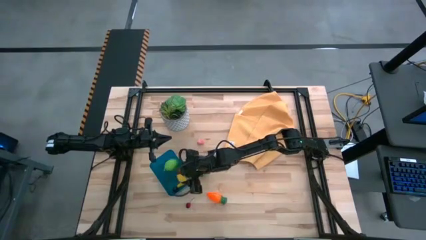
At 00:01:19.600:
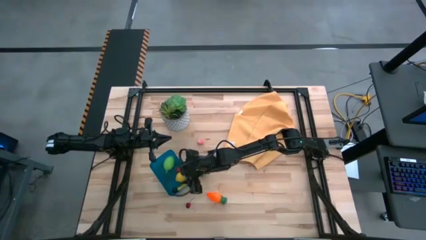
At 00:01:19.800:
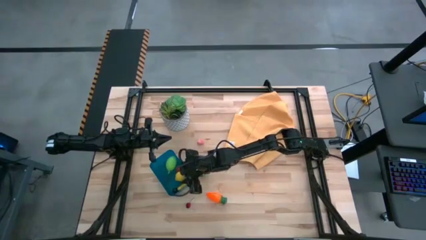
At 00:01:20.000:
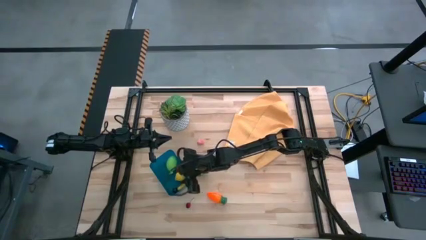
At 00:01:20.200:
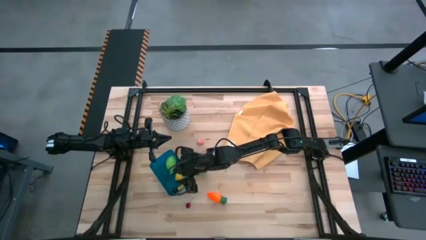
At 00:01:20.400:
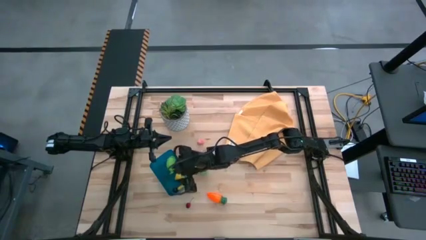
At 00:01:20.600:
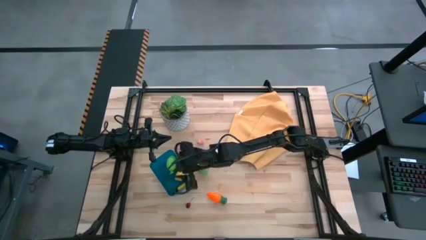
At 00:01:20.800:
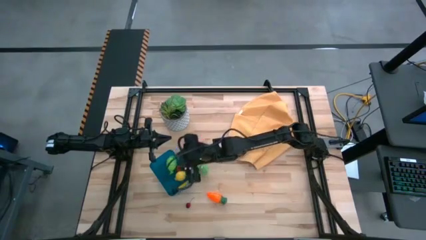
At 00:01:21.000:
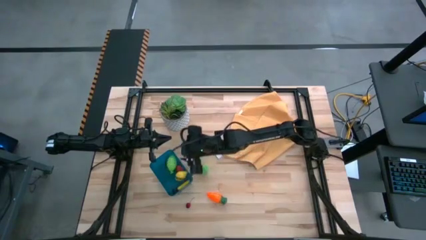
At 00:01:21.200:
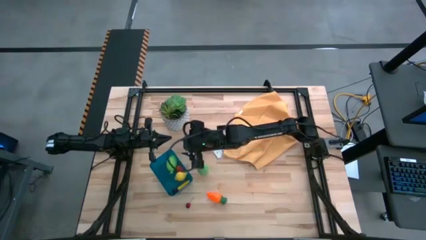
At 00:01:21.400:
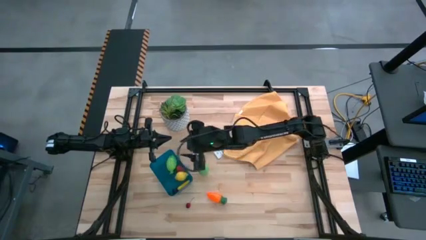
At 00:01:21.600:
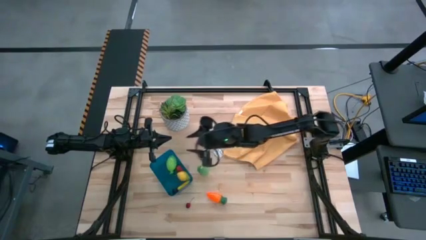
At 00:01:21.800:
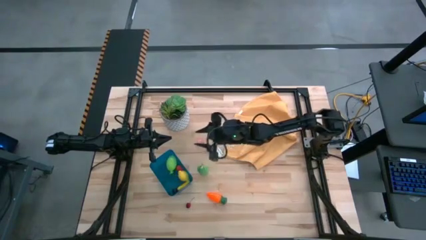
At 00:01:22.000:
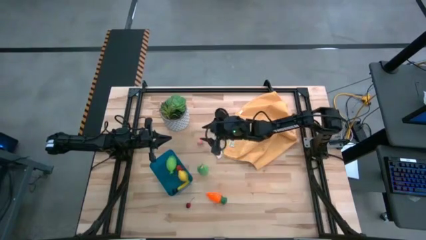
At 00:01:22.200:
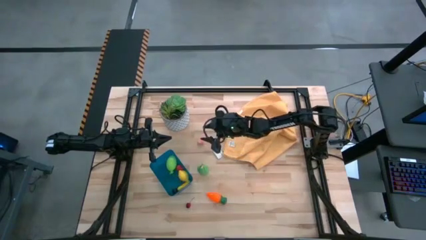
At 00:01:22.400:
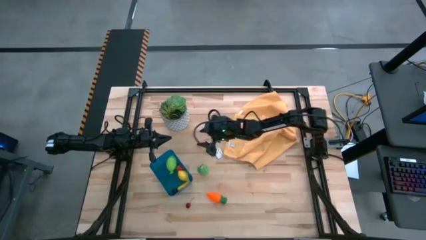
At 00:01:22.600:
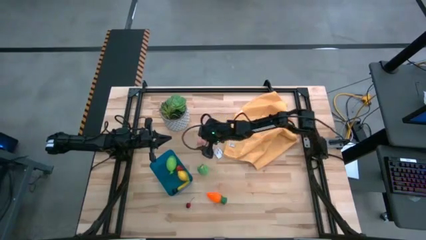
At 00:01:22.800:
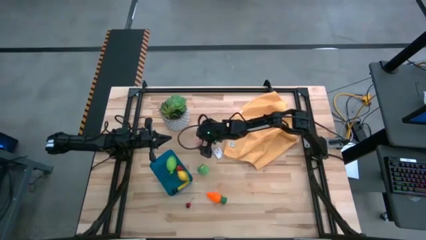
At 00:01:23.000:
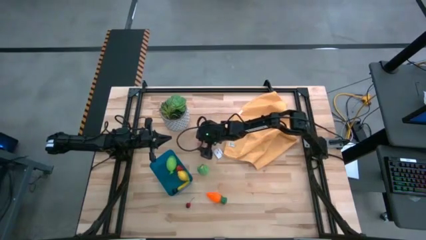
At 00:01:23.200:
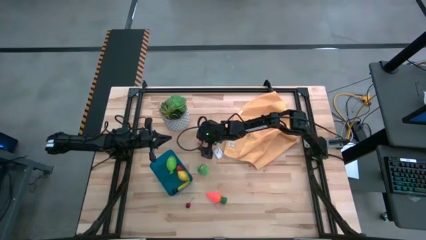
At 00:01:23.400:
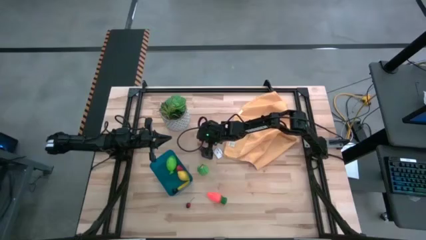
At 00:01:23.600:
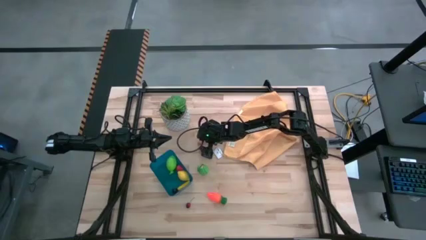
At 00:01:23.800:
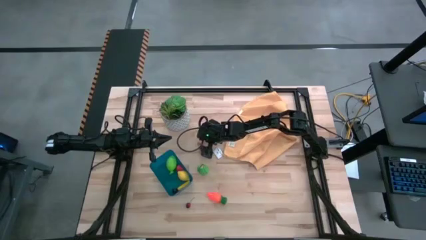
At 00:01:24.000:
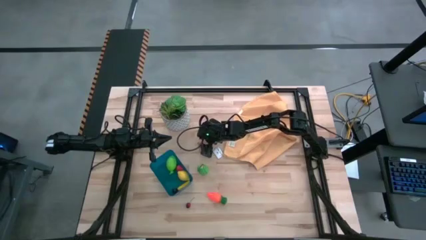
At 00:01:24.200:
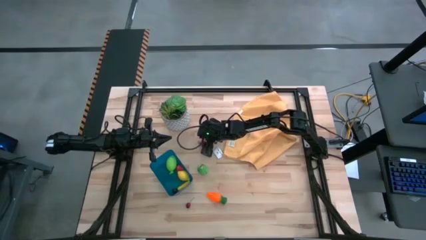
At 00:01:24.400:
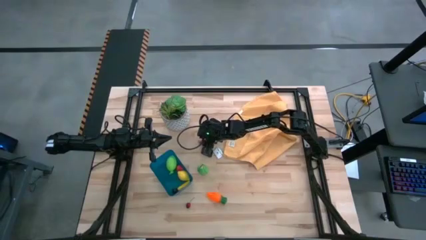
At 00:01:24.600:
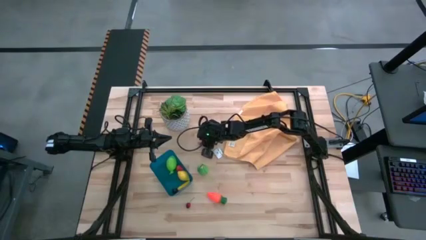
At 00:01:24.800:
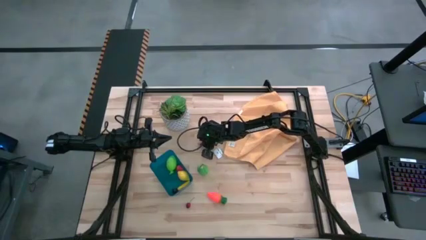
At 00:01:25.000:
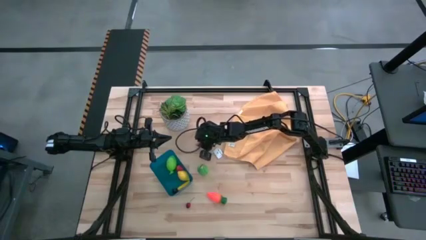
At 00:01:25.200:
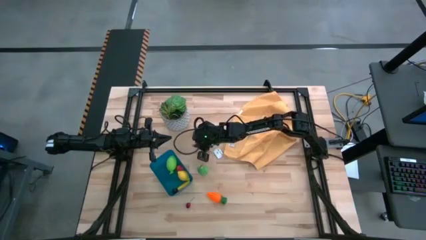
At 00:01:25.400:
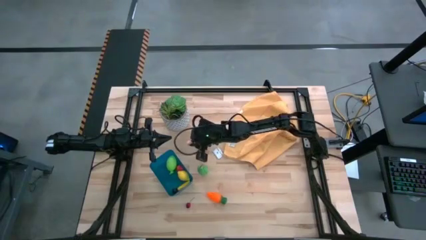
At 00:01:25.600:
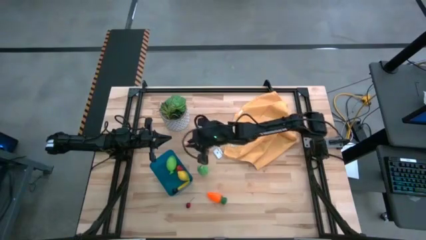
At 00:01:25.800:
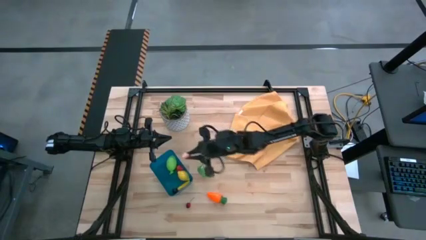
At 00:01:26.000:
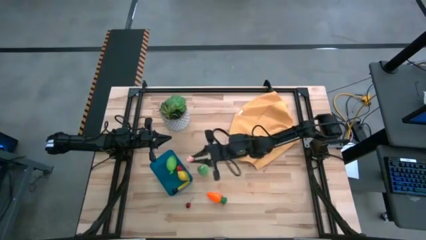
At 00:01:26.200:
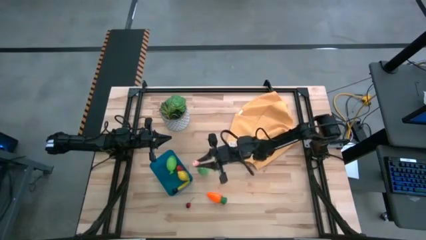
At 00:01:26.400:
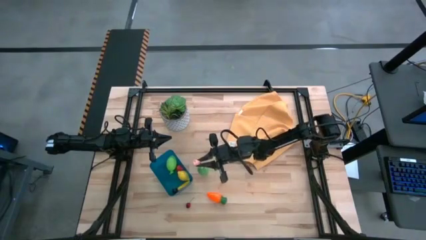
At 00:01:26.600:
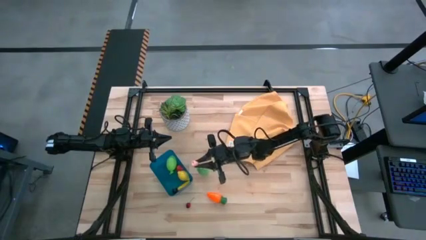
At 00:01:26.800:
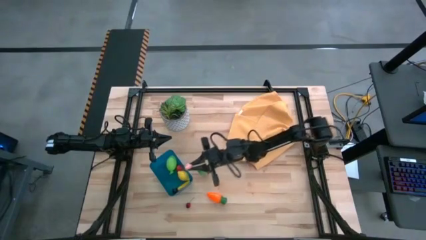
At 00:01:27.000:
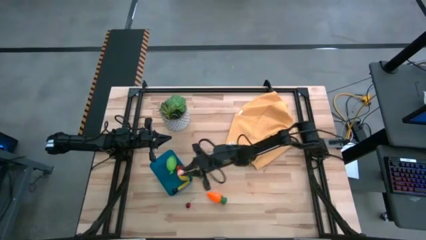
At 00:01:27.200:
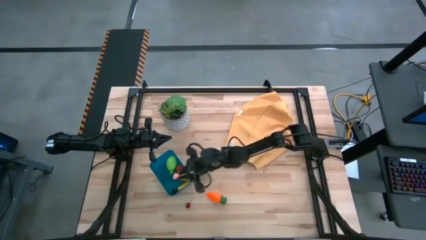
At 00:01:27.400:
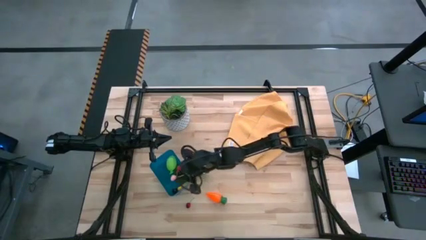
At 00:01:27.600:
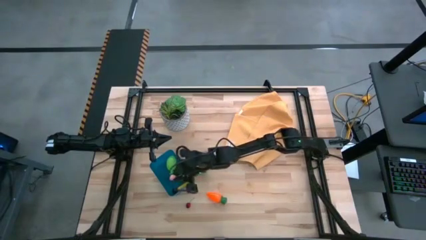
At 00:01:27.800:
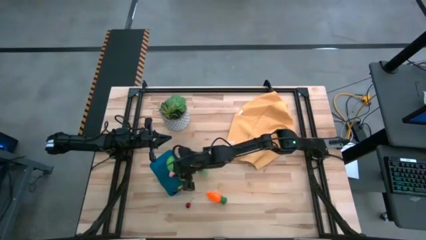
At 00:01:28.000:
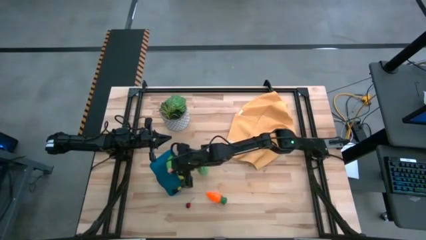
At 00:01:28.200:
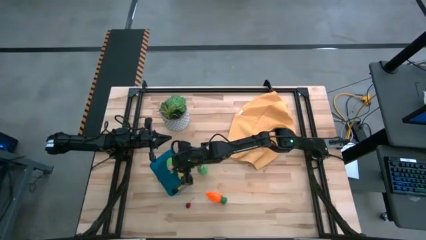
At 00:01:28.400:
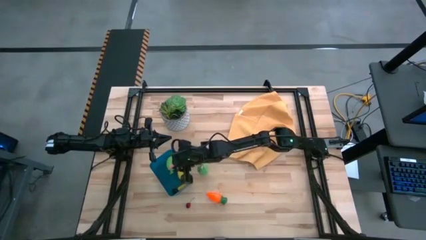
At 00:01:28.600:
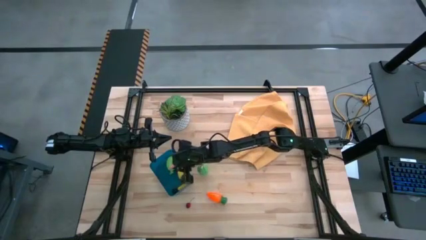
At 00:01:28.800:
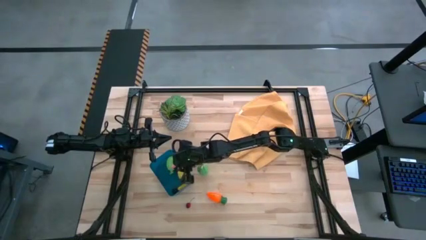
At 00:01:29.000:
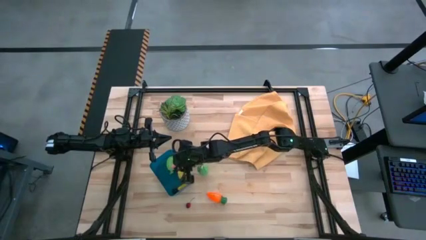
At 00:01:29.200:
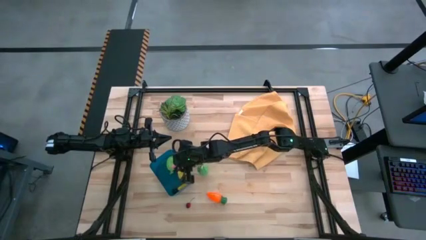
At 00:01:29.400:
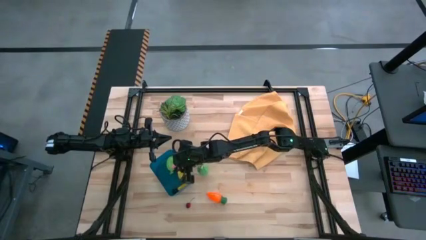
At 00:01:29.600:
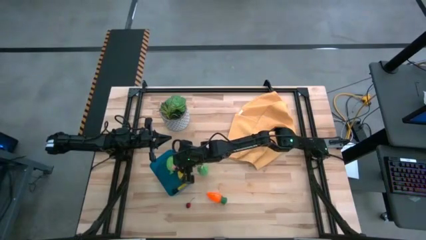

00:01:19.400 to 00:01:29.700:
Task: Pick and placing Produce into tupperware
Put the pink peach into the blue bin

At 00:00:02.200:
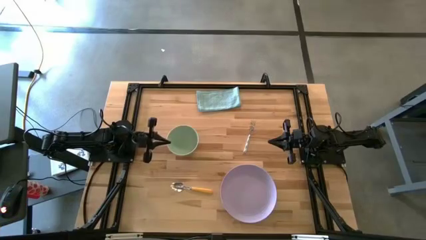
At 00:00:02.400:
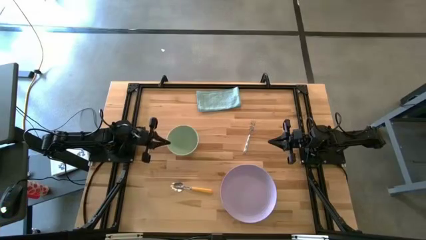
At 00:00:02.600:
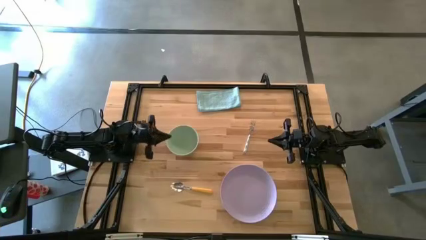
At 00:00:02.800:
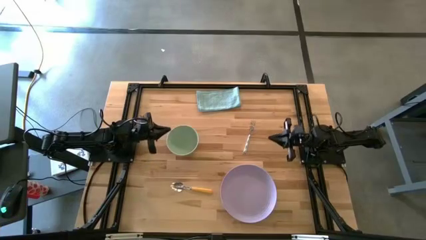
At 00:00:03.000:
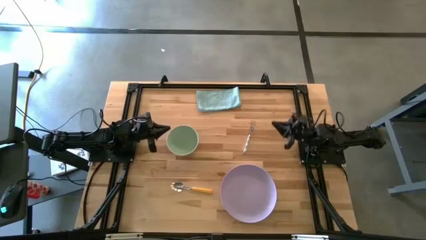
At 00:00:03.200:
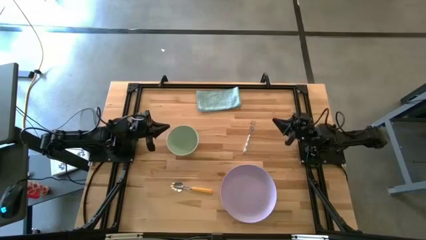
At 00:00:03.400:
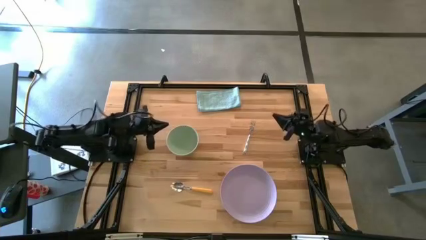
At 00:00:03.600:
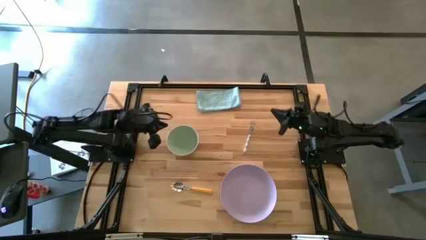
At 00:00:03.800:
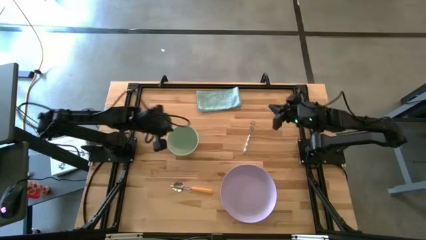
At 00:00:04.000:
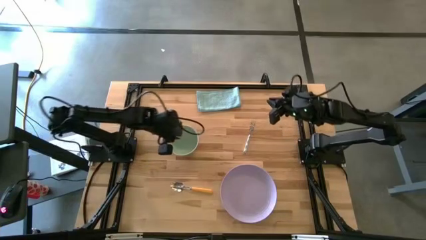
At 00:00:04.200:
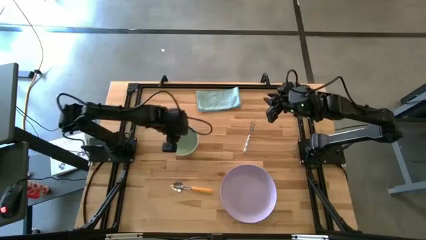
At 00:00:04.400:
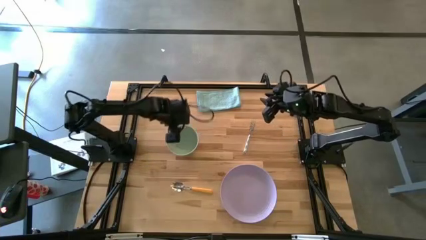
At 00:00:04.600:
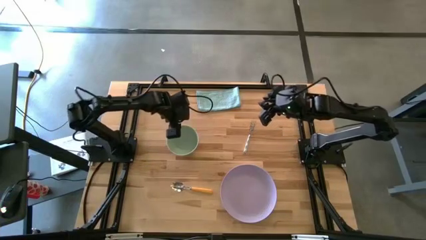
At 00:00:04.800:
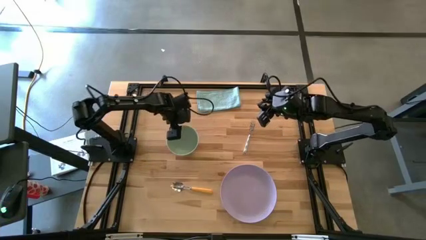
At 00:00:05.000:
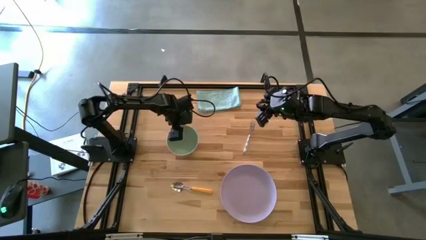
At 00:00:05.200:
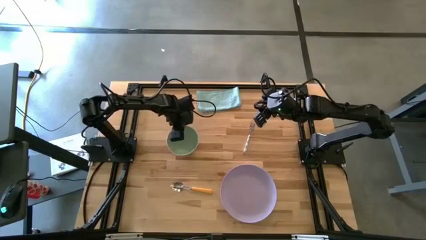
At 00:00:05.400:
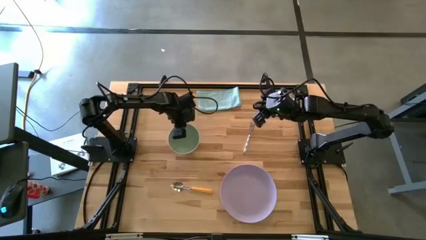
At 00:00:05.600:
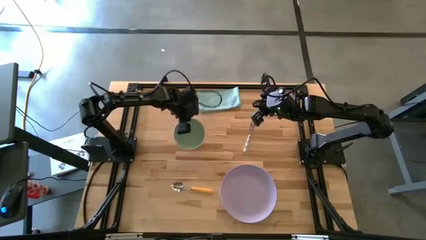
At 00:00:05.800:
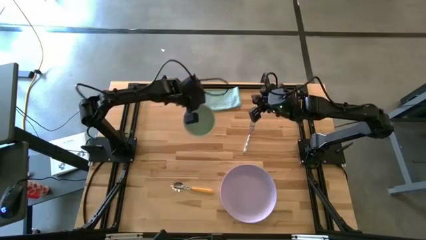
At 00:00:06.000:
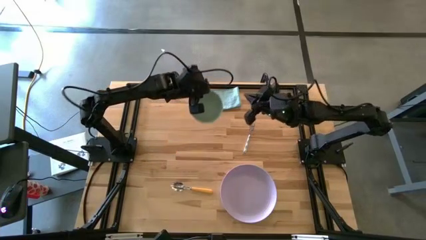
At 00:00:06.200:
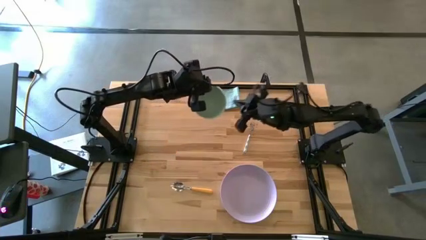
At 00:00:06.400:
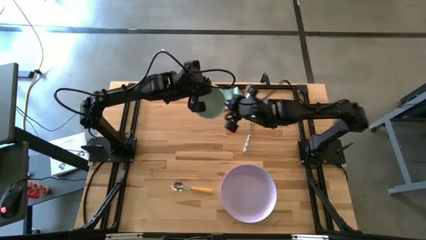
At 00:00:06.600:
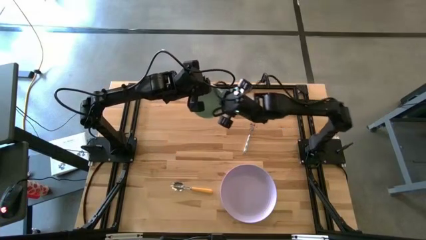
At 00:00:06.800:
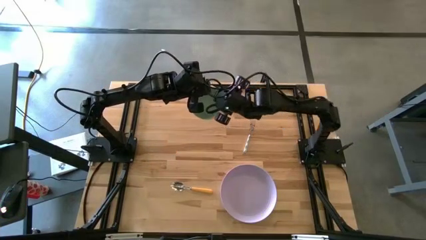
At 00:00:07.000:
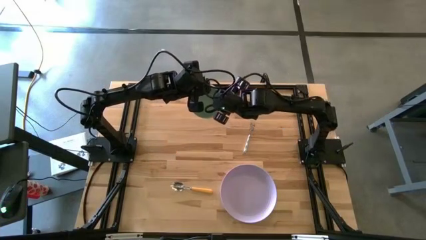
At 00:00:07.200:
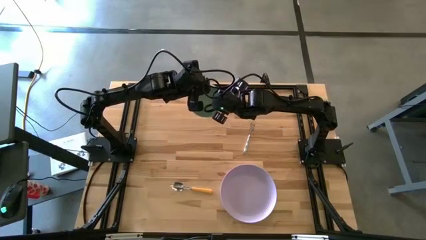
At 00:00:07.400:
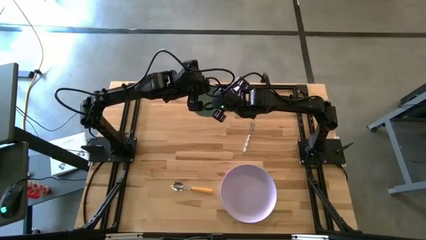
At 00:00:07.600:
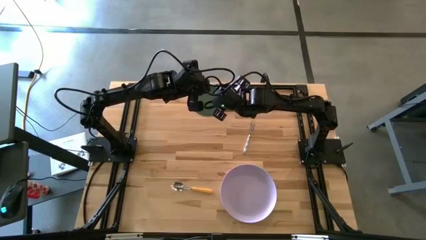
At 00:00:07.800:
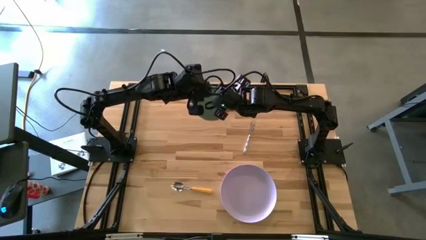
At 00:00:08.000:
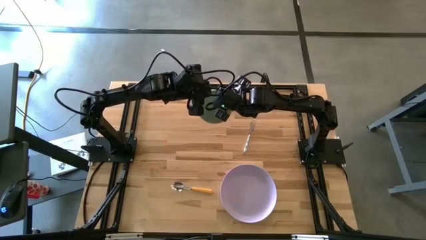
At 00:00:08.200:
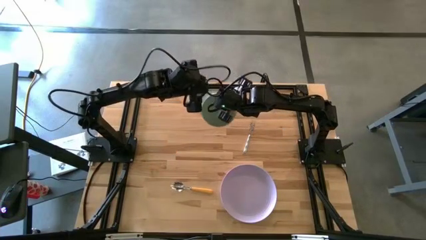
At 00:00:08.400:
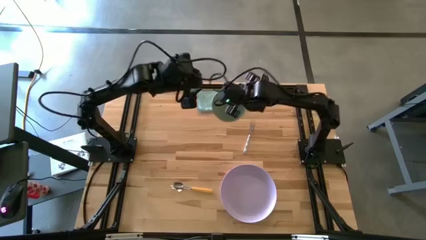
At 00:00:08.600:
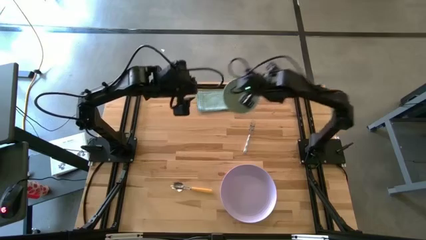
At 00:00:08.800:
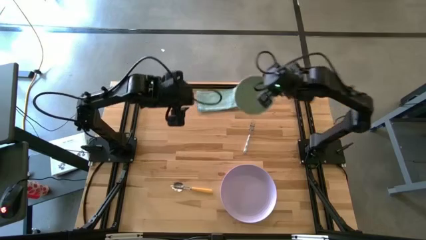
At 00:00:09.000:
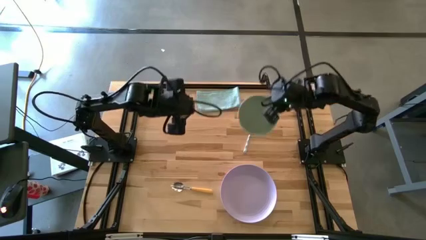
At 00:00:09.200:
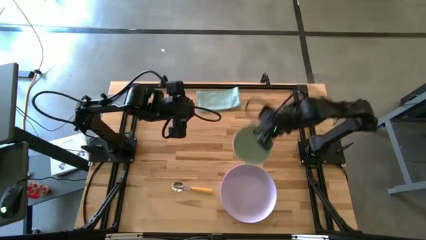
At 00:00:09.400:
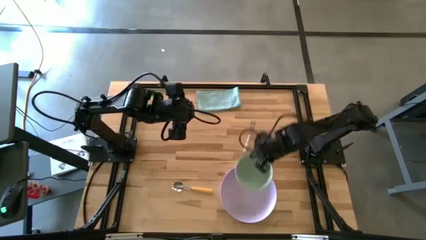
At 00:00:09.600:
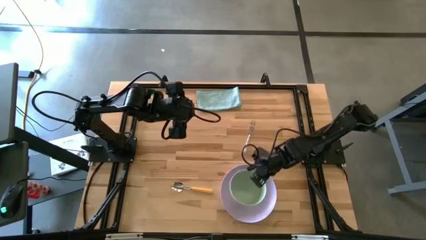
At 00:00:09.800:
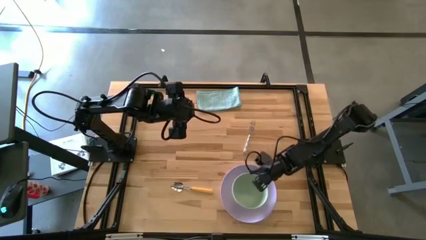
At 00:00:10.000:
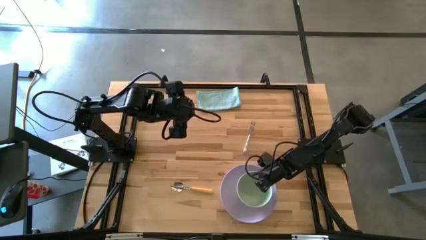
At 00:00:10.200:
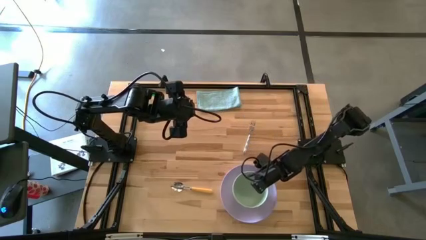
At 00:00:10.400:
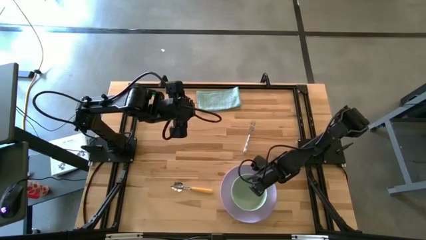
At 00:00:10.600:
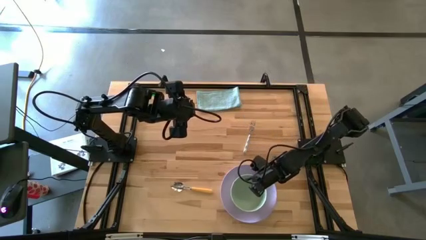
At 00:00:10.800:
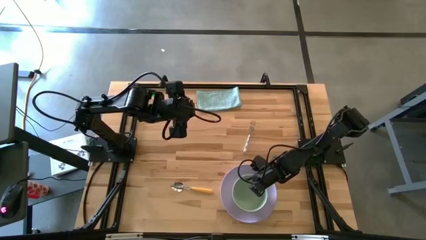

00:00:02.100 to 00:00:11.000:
Task: Set table place
Put the green bowl on top of the purple plate
